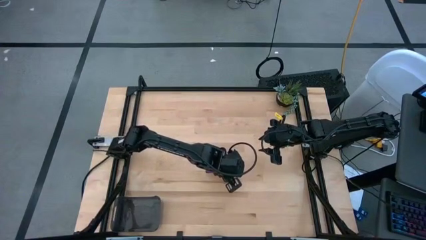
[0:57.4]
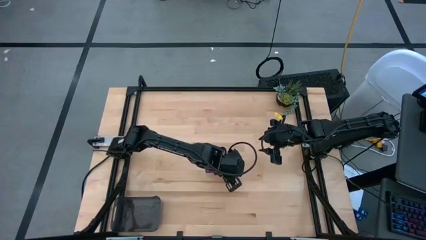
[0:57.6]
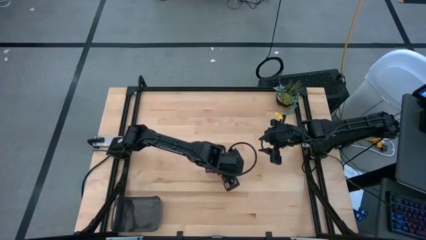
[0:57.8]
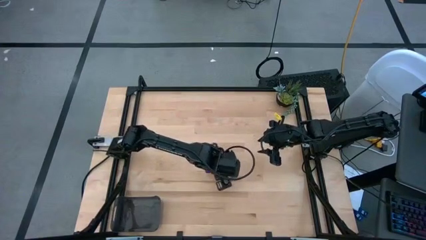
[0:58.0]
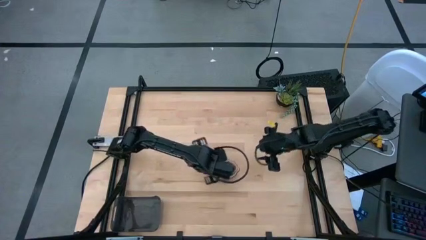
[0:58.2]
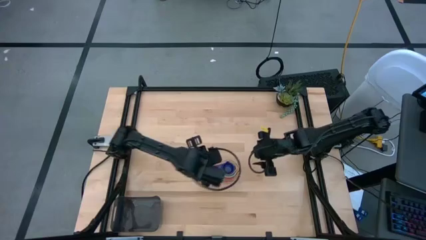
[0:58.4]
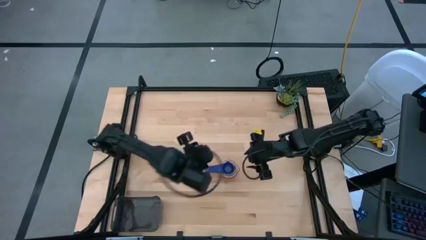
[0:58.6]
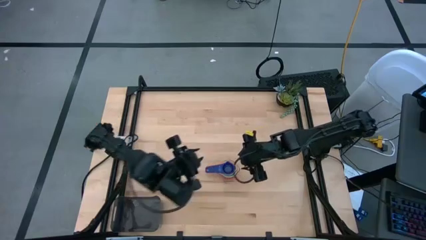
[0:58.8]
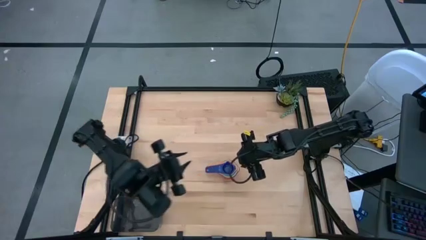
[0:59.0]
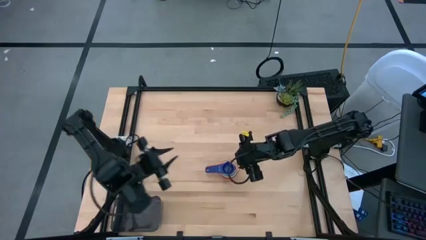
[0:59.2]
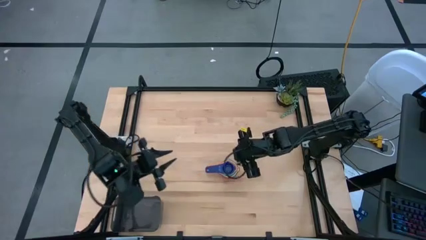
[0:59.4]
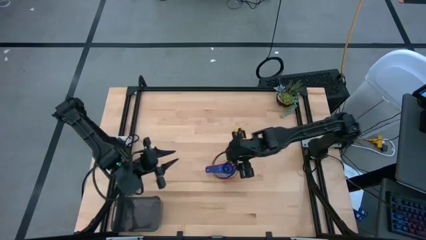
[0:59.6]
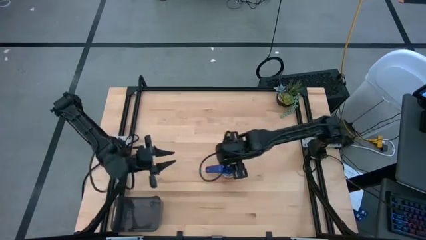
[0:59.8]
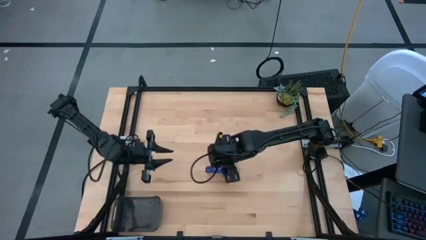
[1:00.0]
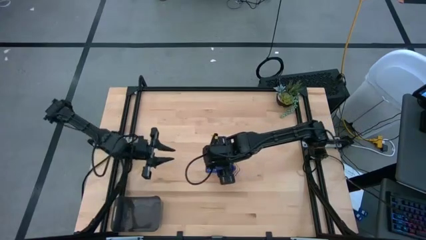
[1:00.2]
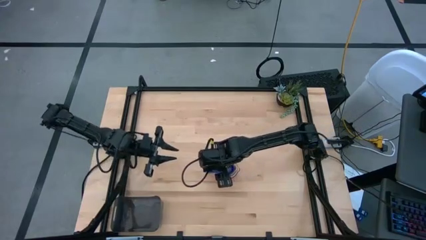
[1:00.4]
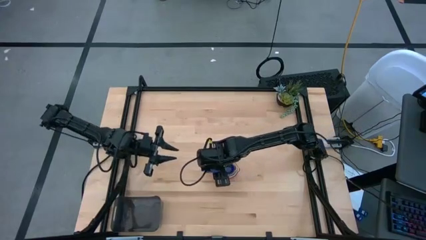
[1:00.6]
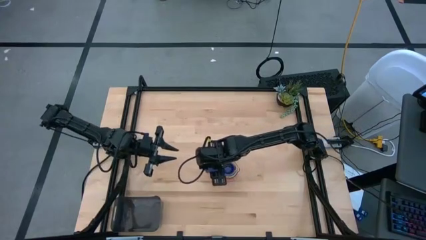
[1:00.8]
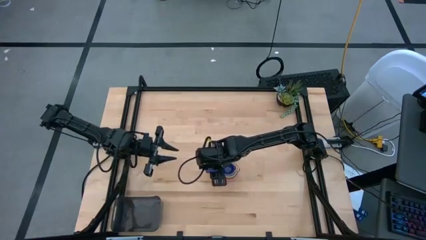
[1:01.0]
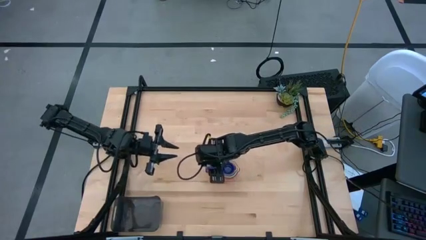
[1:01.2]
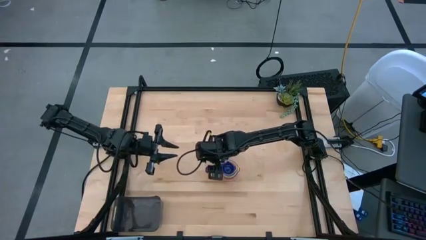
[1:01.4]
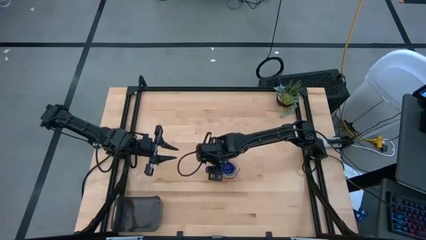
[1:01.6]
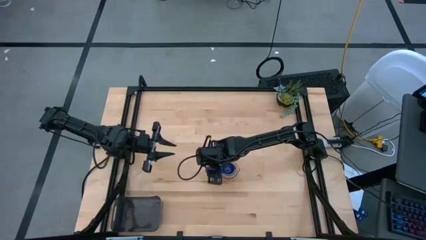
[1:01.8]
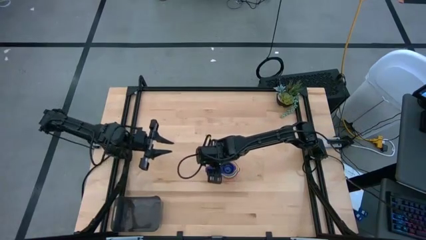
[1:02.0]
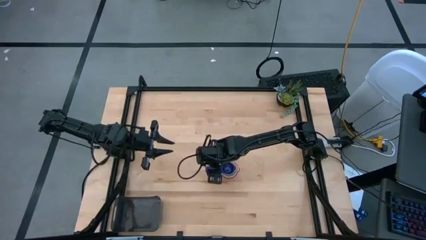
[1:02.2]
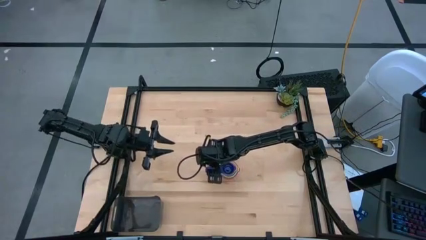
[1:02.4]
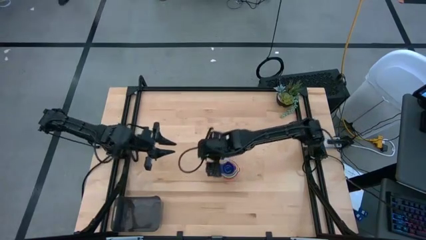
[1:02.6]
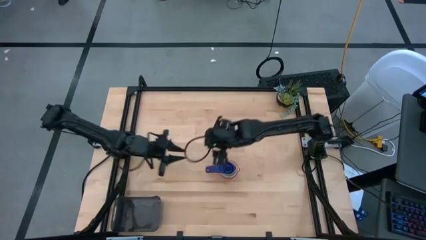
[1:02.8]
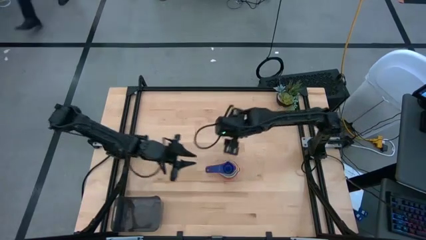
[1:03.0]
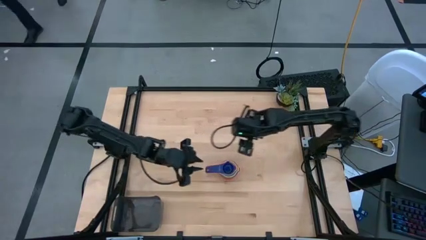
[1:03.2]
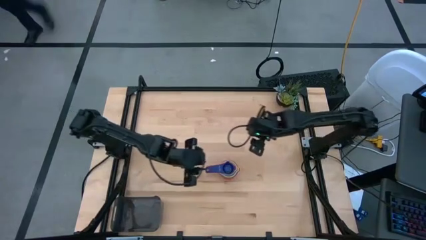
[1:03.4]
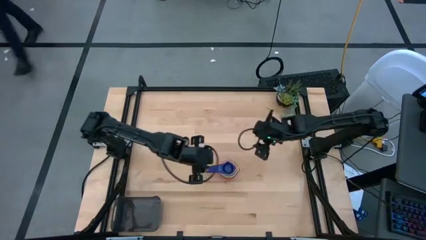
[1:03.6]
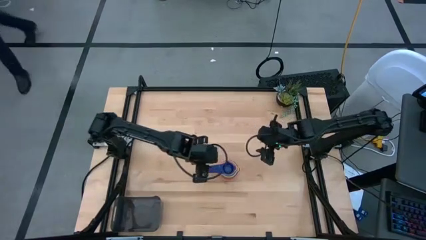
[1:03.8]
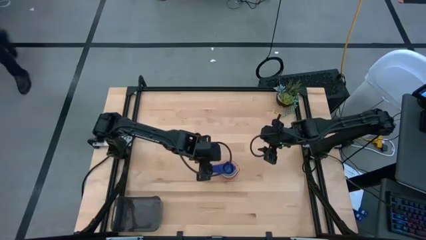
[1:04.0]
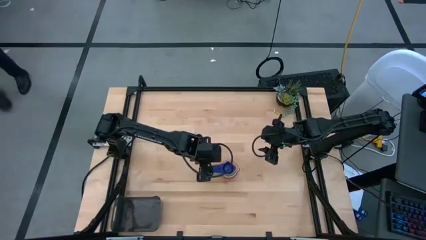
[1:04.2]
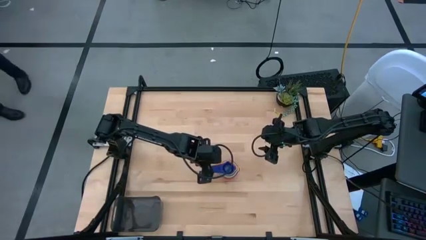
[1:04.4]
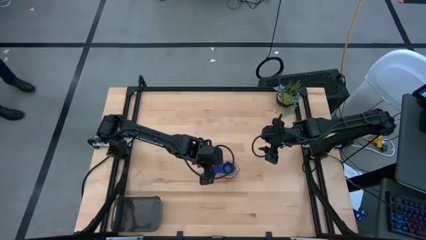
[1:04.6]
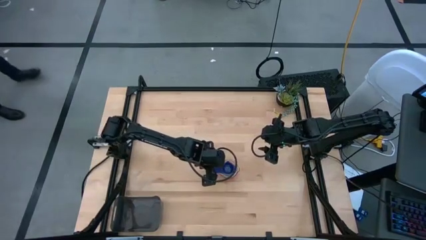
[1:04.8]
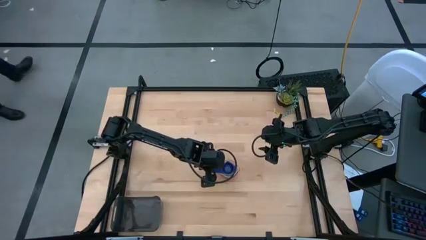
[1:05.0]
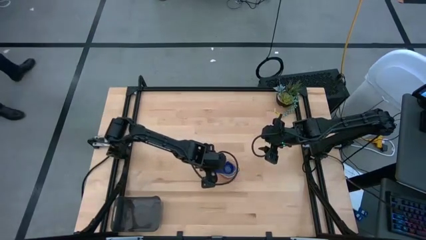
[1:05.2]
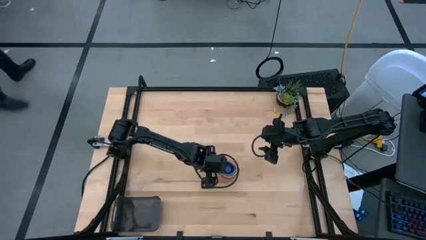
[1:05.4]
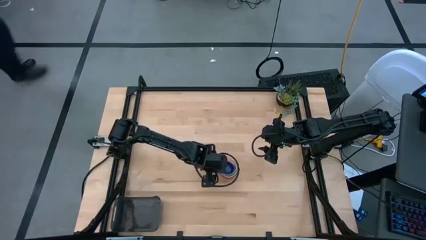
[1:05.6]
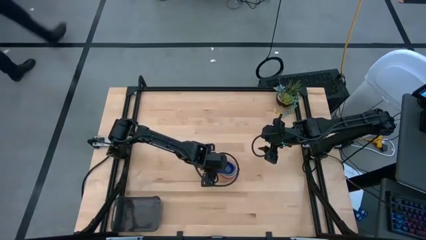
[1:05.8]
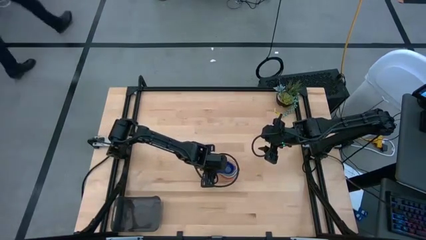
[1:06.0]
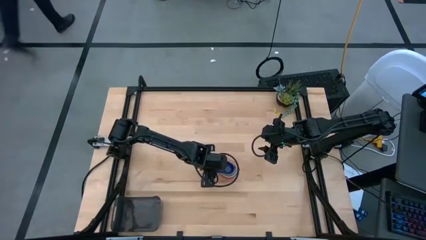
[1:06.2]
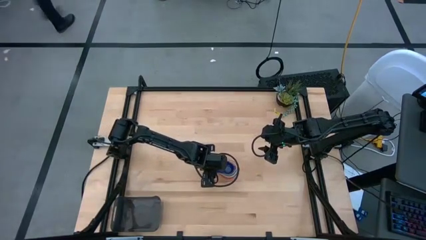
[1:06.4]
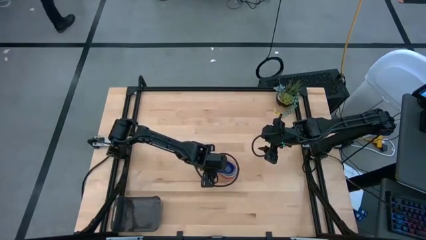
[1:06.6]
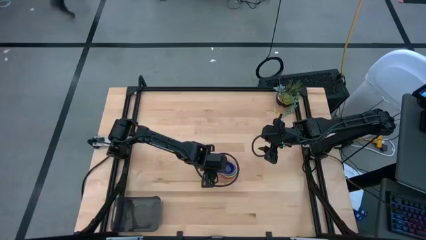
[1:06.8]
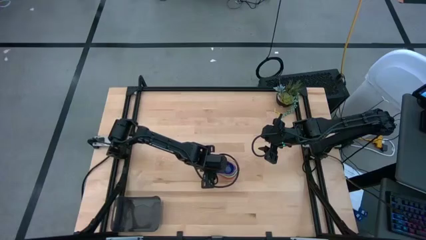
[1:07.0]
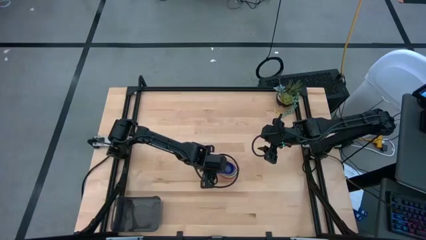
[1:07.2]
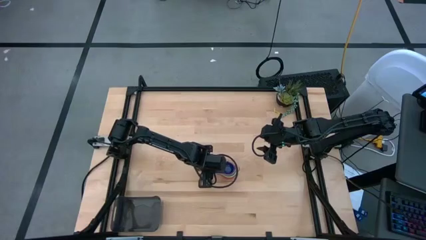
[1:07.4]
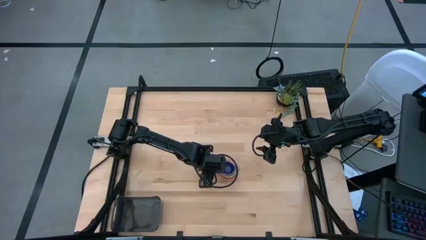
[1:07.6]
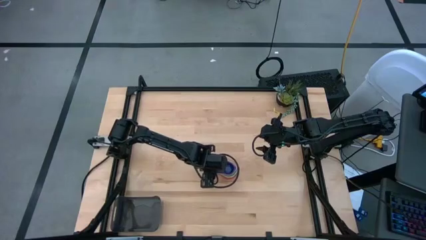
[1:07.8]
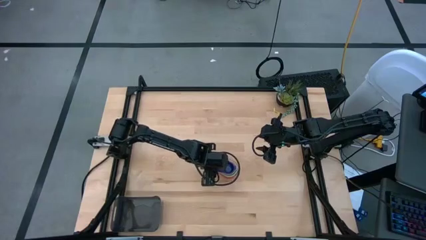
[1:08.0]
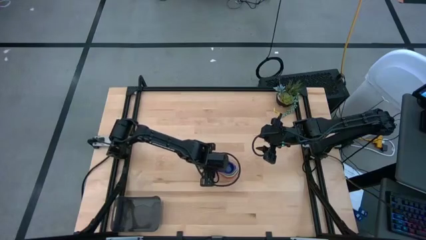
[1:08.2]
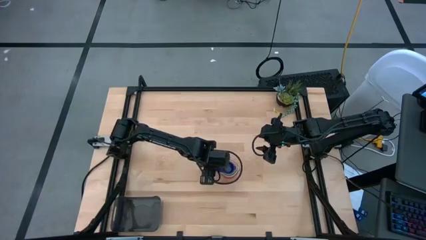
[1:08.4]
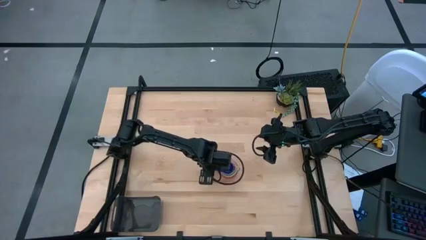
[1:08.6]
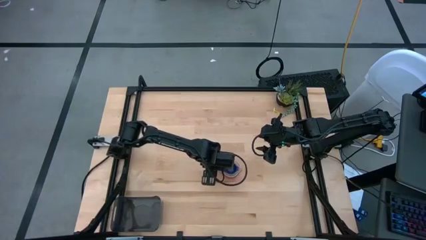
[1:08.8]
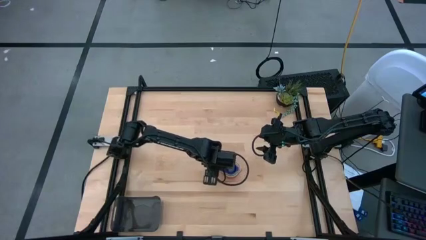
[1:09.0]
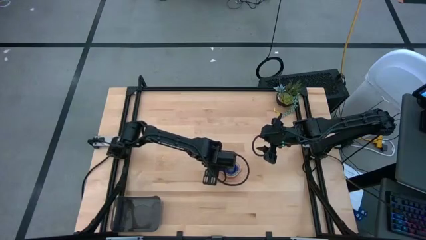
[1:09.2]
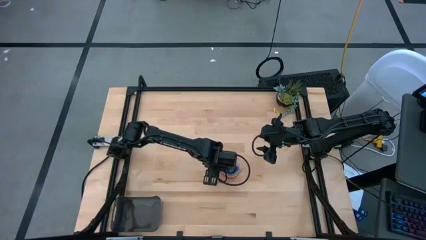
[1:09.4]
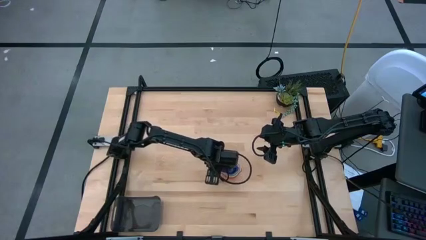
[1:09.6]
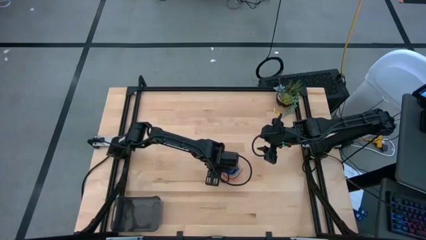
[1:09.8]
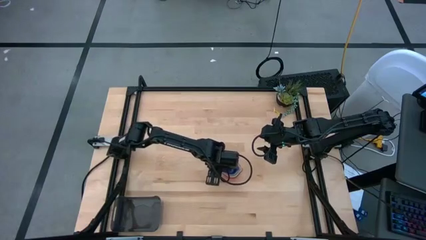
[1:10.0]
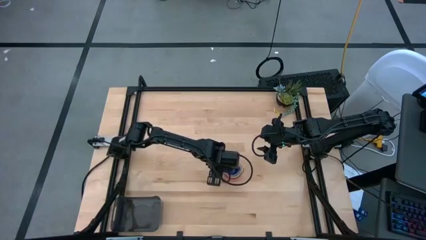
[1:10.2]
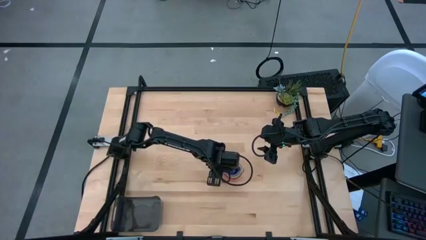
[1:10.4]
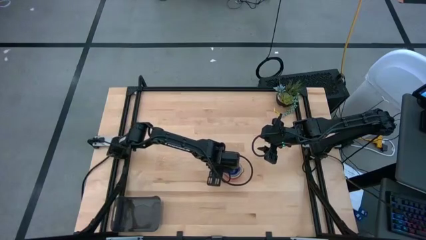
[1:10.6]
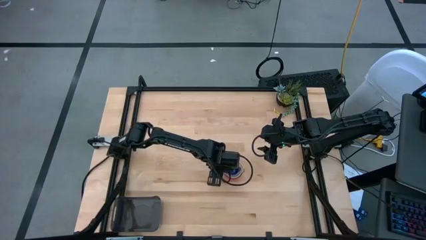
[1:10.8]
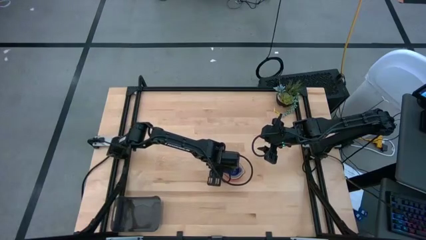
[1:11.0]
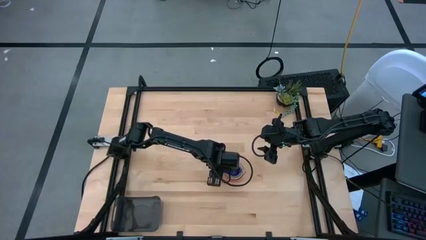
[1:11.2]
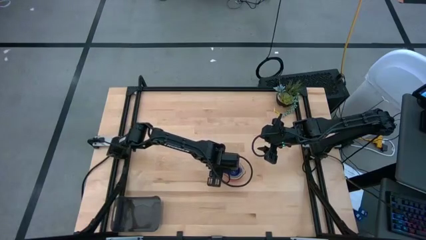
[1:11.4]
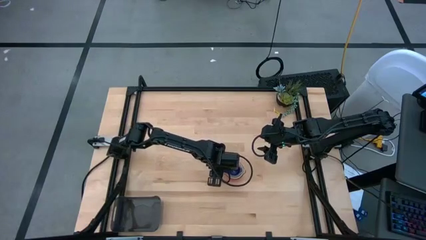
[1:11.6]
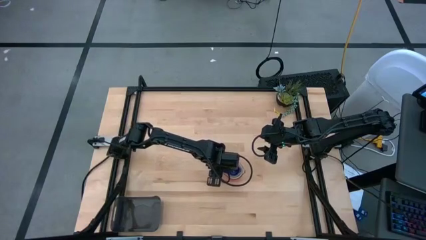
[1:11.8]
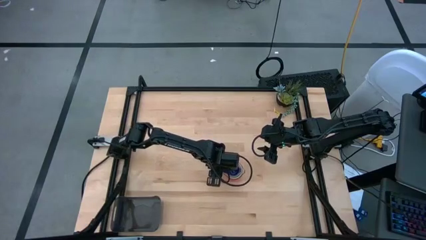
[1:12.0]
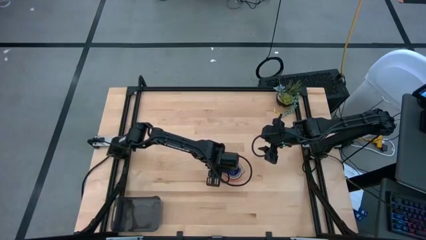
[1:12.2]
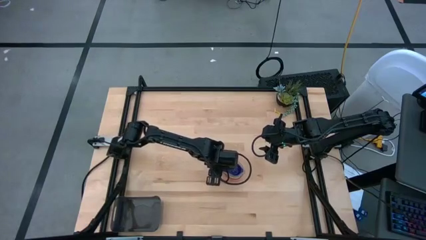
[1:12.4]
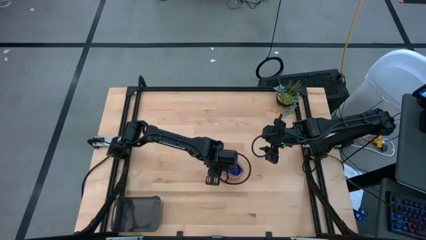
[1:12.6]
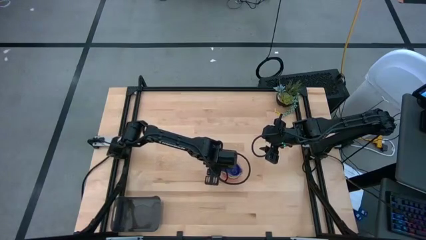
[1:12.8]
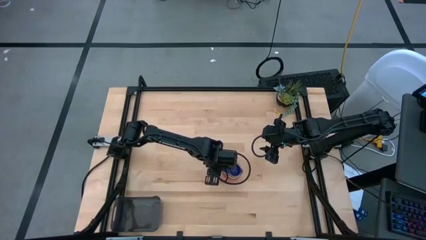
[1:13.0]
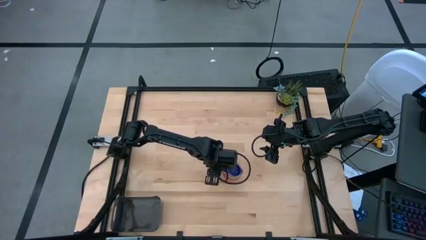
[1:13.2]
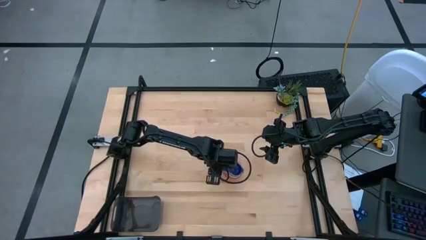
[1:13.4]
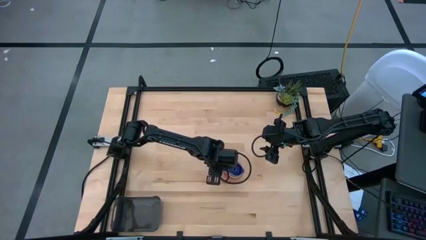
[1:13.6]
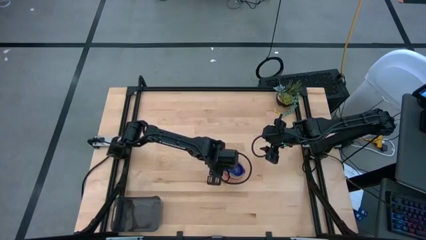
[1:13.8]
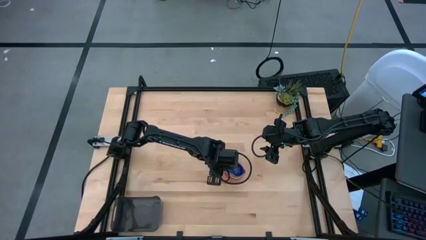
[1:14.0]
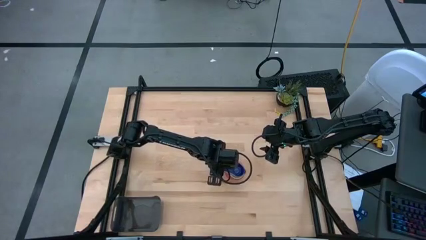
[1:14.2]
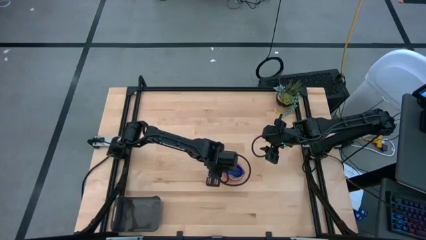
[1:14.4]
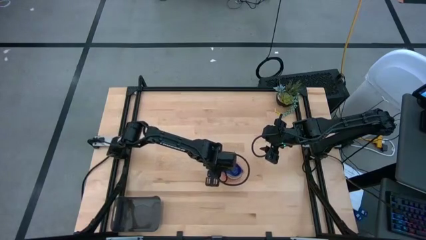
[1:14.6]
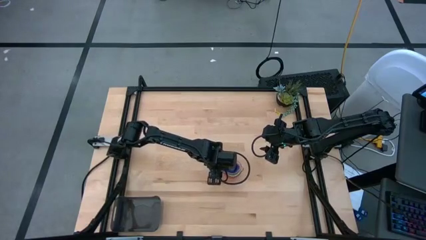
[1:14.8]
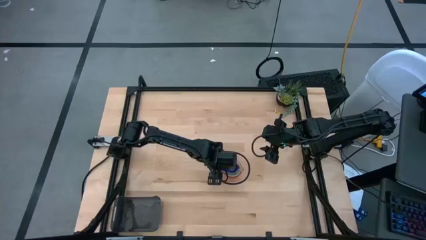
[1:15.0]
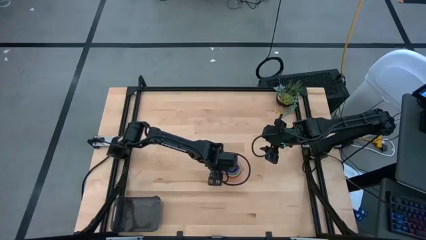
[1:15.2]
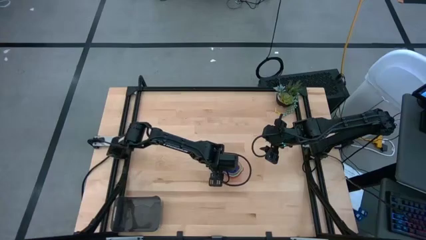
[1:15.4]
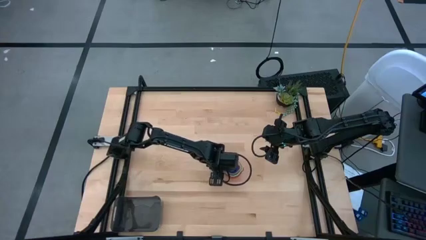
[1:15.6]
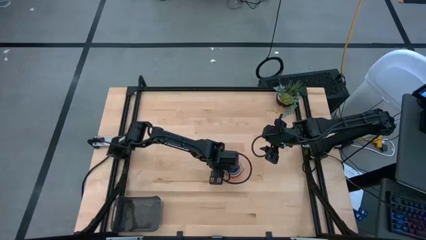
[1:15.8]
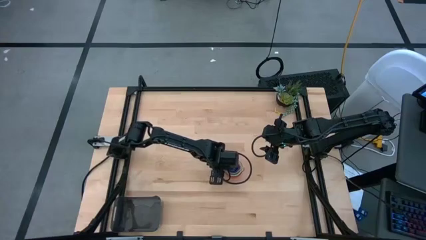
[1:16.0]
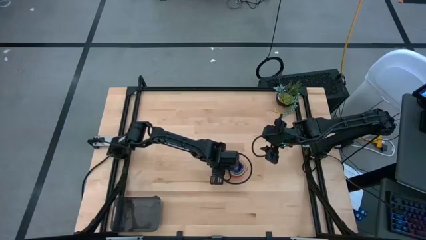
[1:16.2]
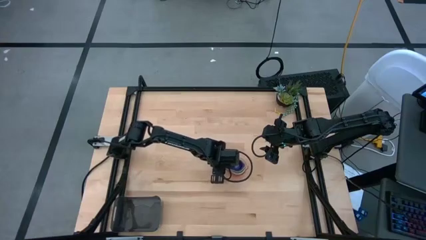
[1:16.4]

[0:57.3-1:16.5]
Task: Nest measuring cups in basket
Put the nested measuring cups into the black bin
